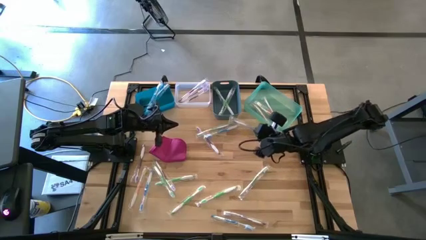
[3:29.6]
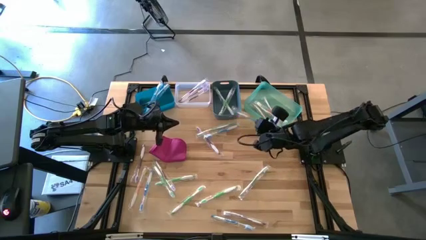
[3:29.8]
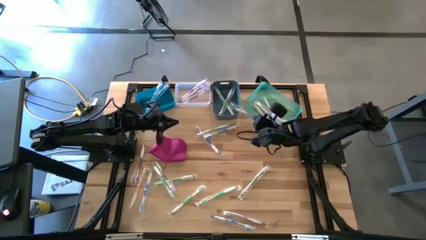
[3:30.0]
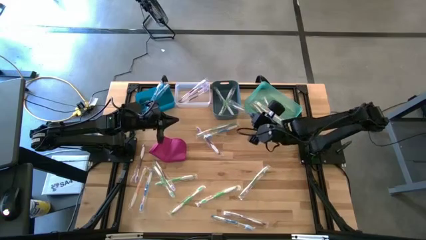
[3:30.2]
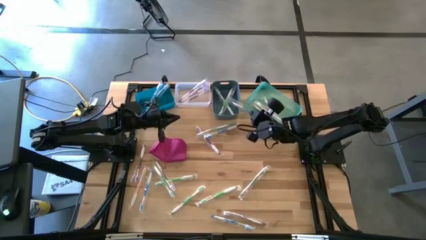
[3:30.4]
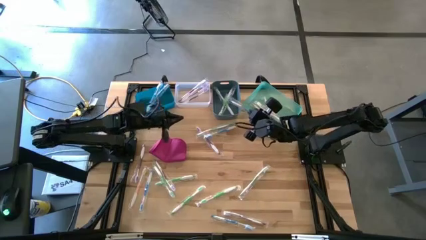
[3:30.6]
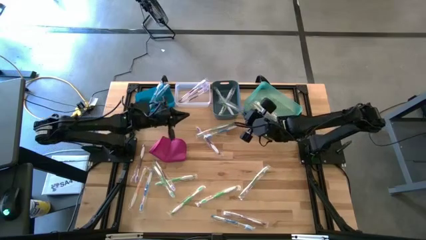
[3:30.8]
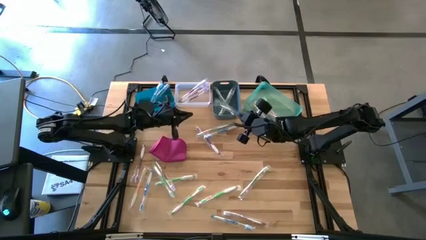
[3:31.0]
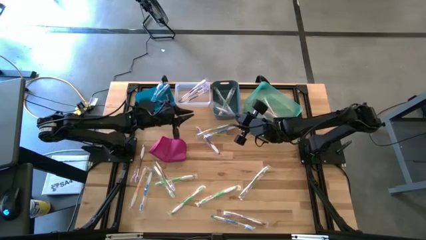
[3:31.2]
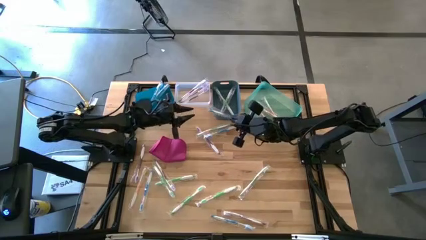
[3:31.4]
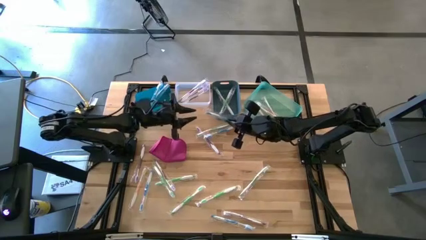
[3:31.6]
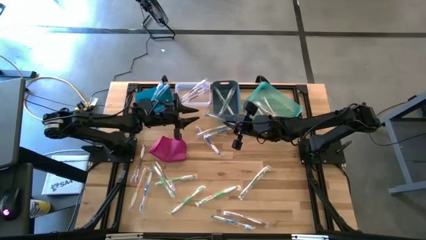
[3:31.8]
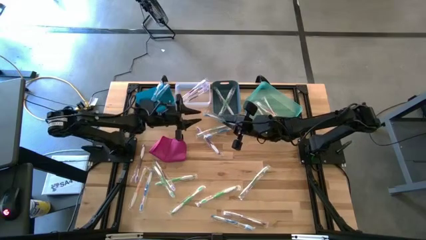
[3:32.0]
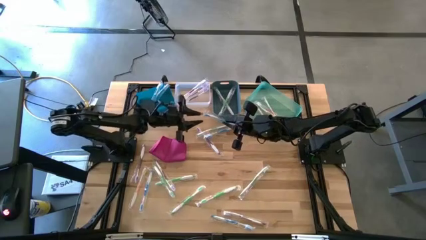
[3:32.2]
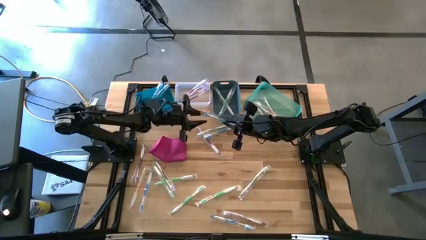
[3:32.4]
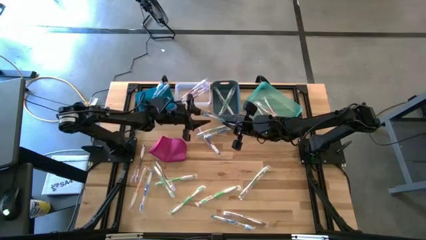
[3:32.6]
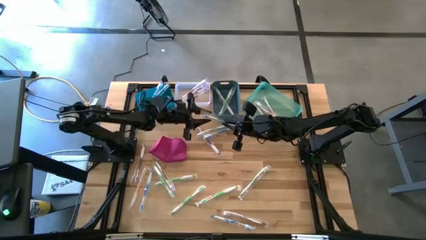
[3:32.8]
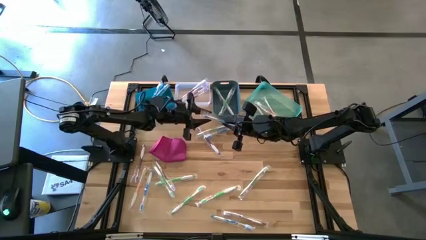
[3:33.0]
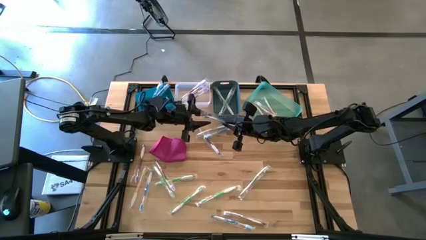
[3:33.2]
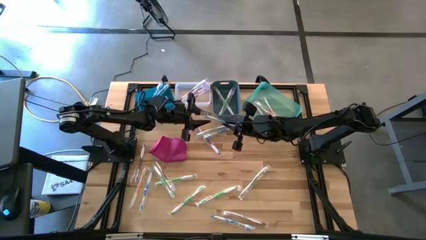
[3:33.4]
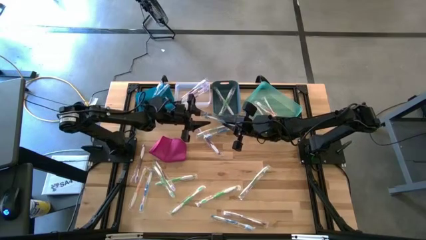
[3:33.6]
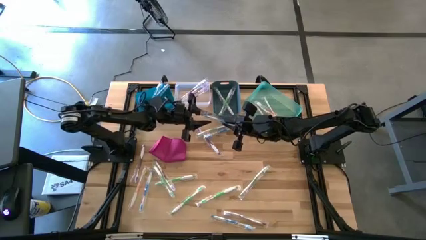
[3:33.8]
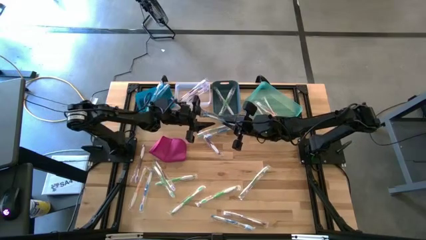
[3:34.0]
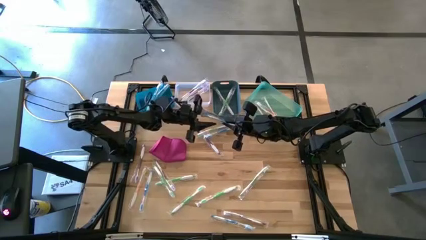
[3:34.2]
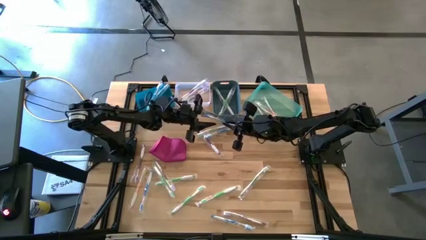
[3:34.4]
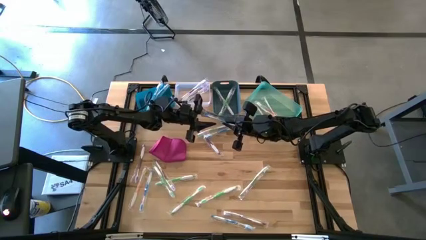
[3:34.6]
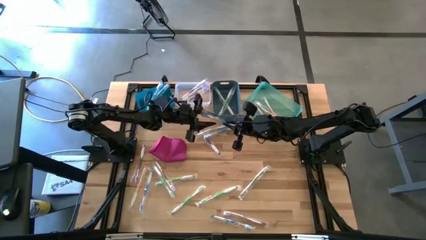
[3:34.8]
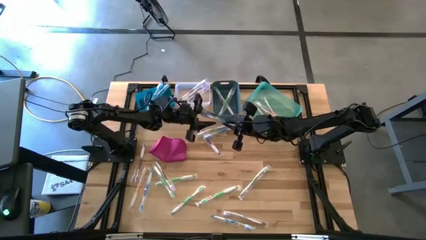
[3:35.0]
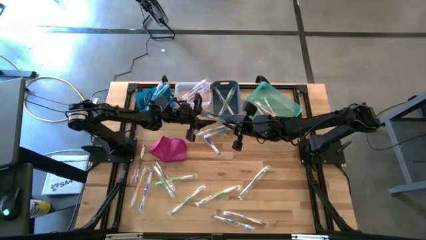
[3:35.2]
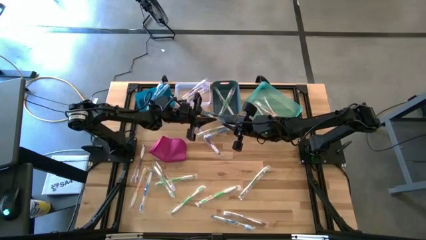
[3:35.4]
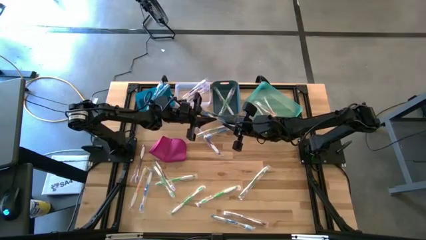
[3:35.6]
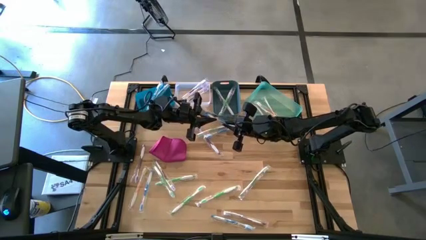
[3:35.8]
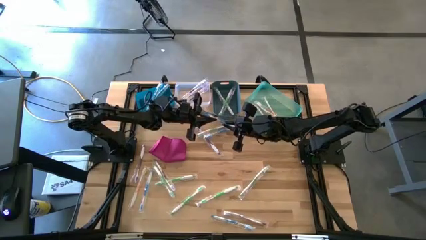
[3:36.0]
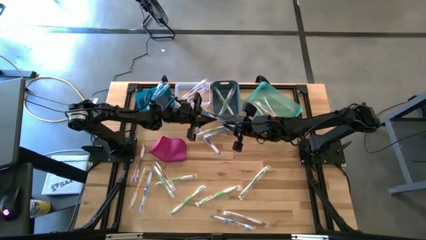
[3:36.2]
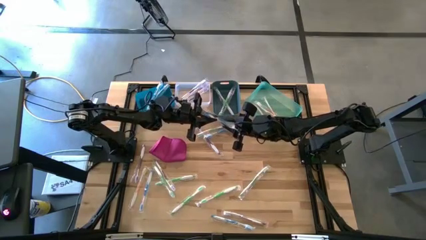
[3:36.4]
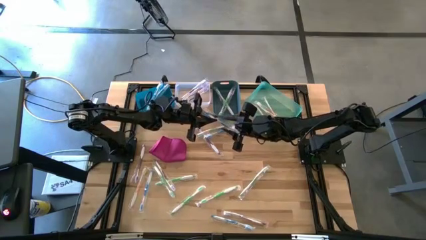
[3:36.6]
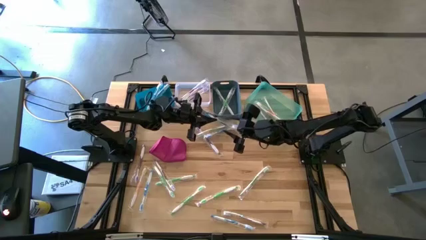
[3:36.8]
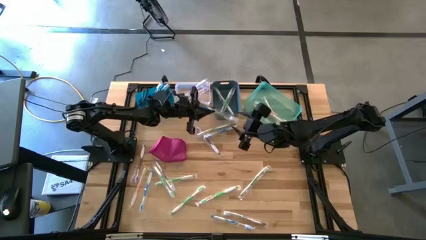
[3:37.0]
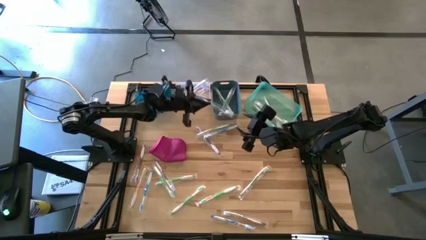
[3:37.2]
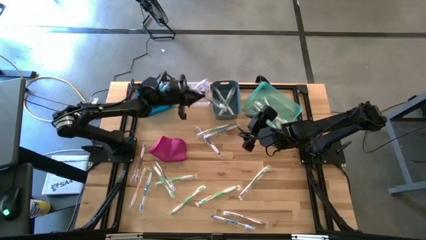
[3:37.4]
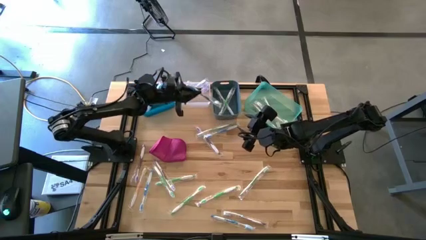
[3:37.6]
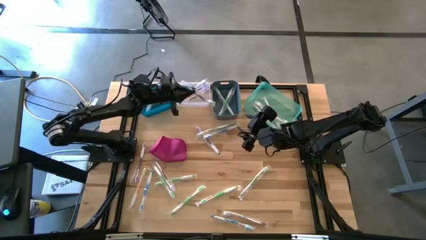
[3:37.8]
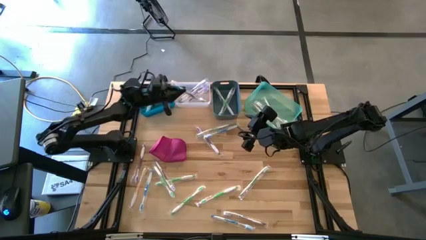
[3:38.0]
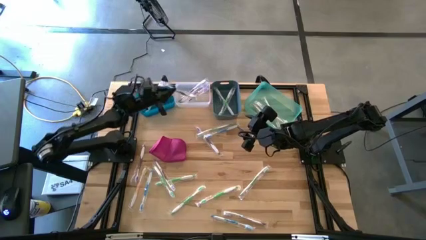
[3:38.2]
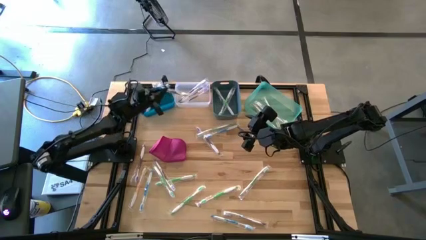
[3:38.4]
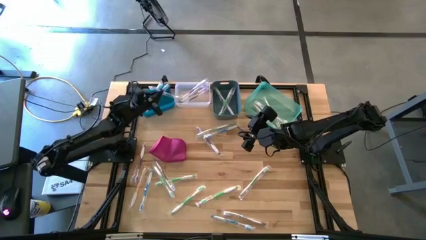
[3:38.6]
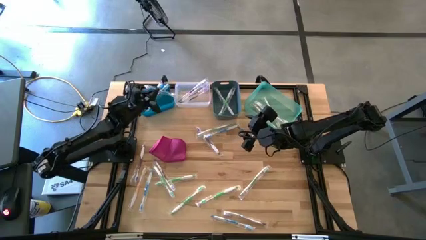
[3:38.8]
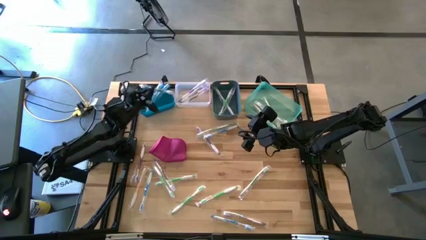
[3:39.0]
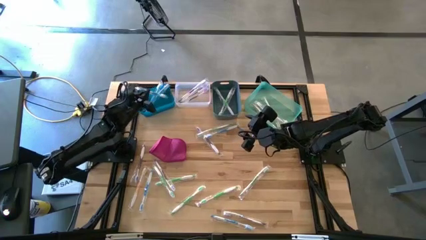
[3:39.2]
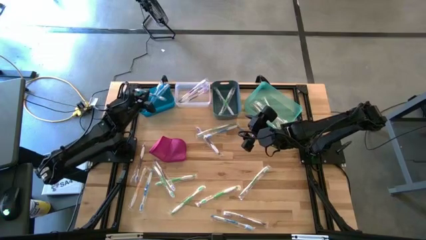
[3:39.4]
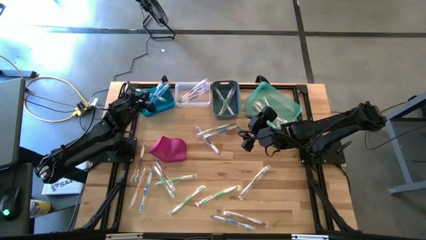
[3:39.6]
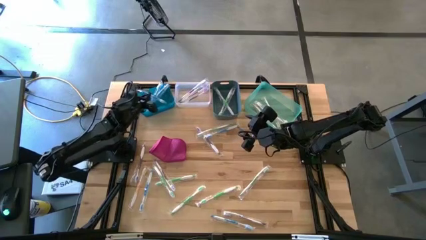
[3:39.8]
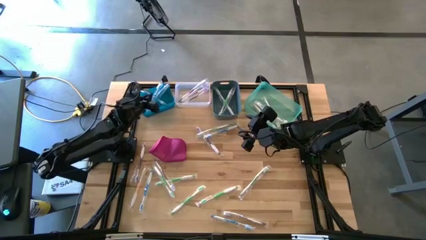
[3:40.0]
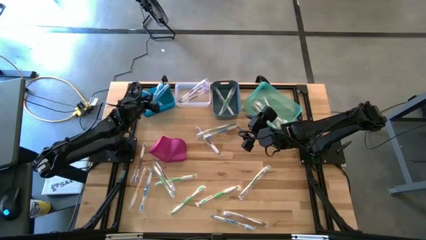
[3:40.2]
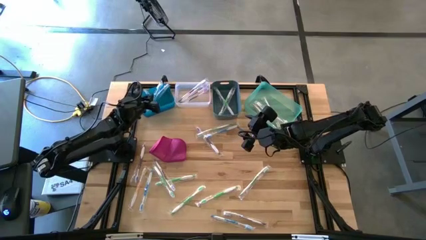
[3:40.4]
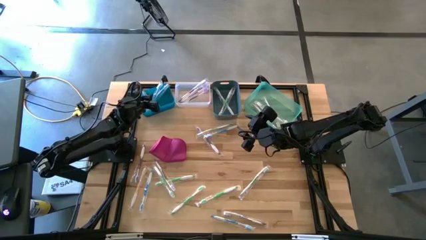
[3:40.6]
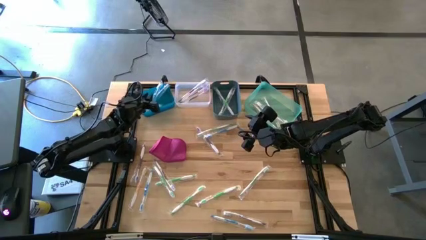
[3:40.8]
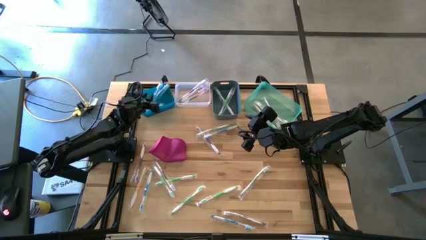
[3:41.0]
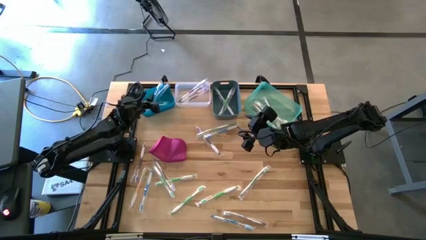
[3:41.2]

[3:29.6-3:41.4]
Task: Pick & Place Toothbrushes
Put the blue toothbrush into the blue bin

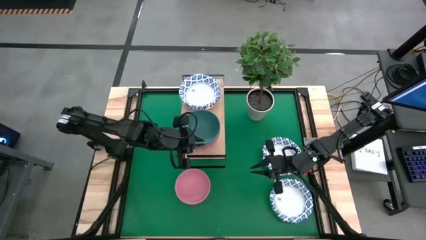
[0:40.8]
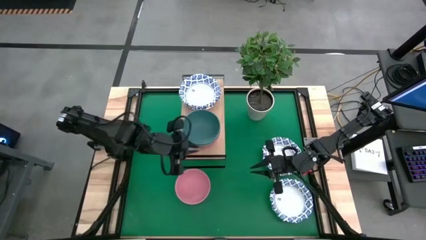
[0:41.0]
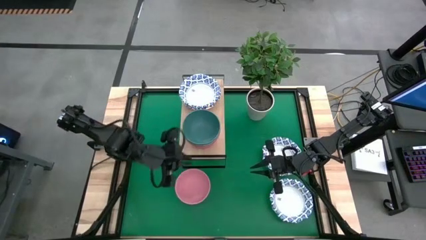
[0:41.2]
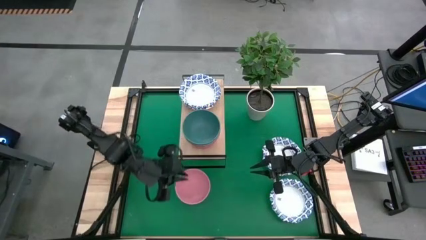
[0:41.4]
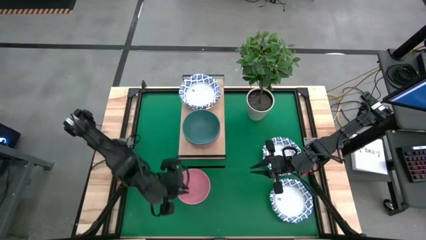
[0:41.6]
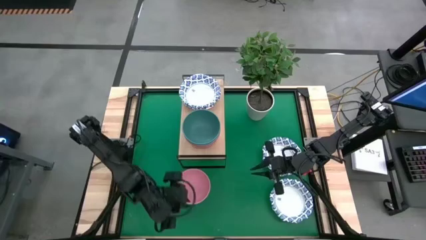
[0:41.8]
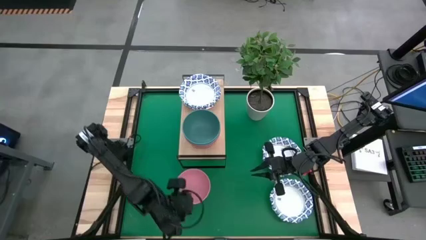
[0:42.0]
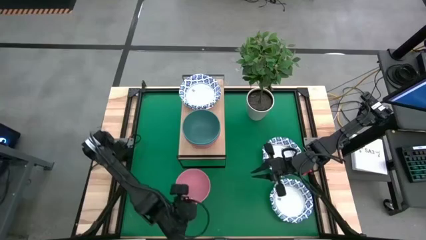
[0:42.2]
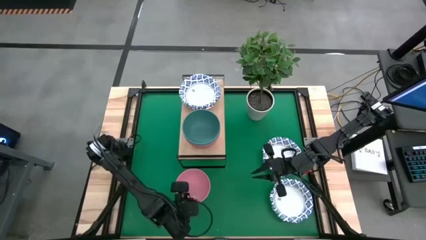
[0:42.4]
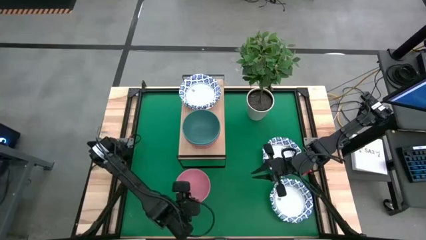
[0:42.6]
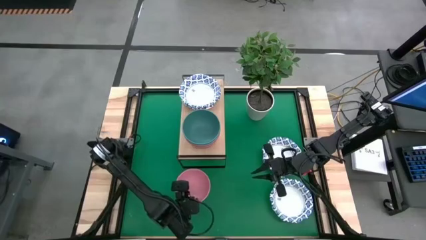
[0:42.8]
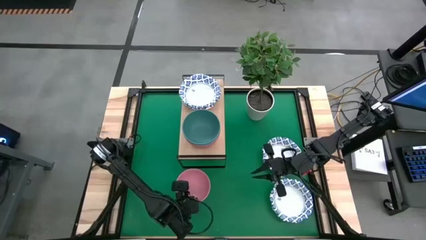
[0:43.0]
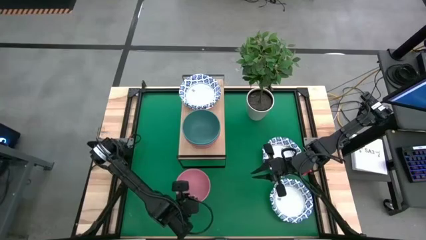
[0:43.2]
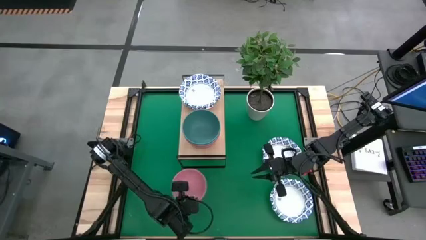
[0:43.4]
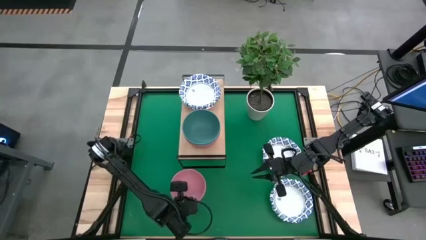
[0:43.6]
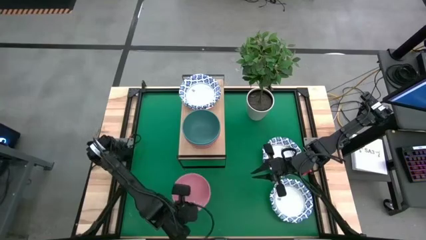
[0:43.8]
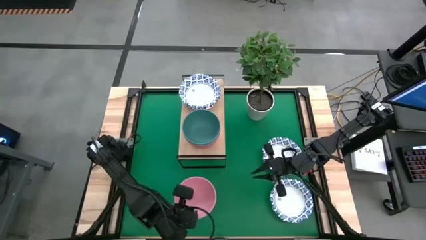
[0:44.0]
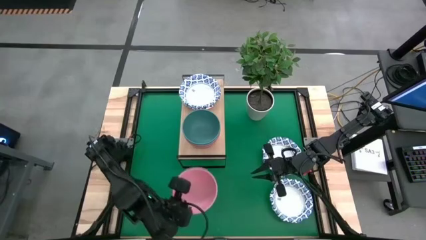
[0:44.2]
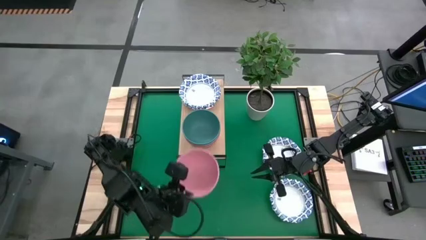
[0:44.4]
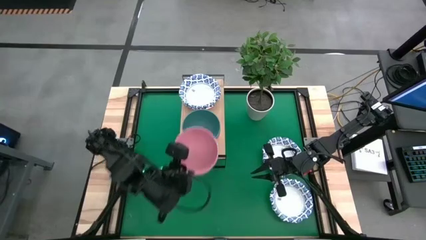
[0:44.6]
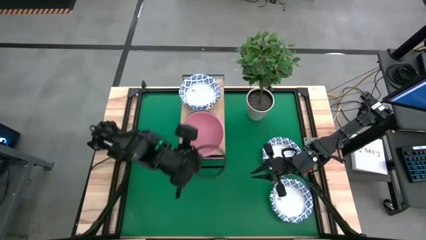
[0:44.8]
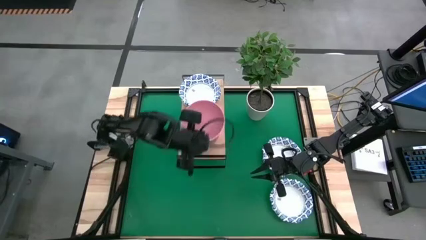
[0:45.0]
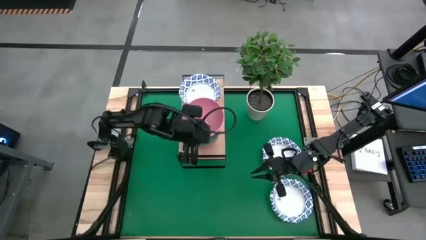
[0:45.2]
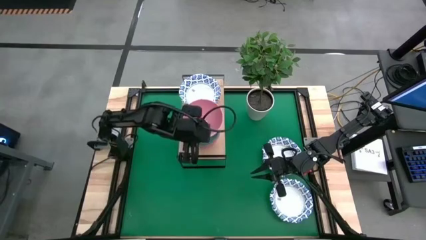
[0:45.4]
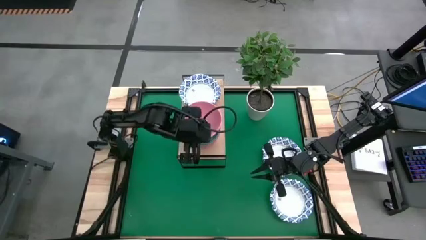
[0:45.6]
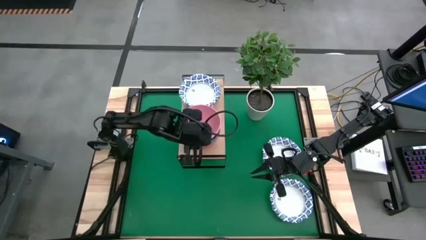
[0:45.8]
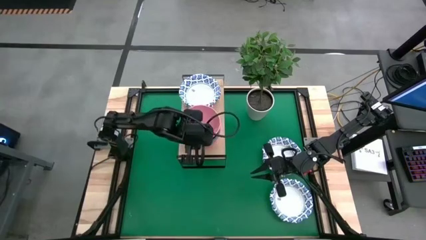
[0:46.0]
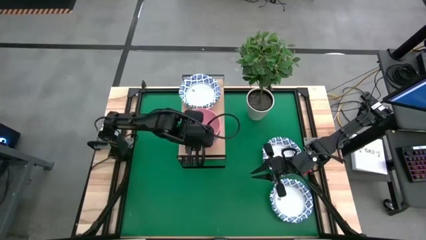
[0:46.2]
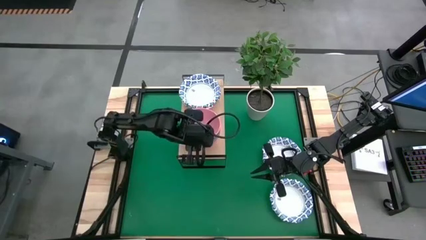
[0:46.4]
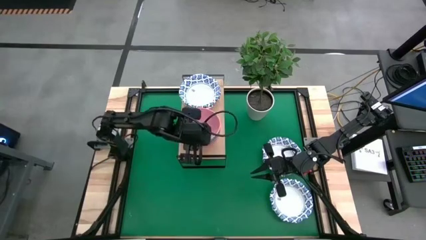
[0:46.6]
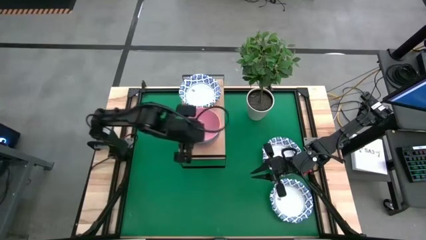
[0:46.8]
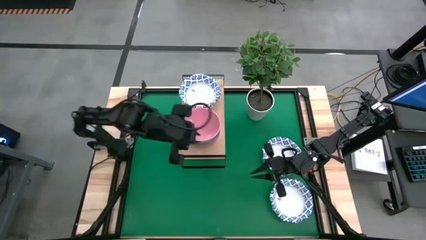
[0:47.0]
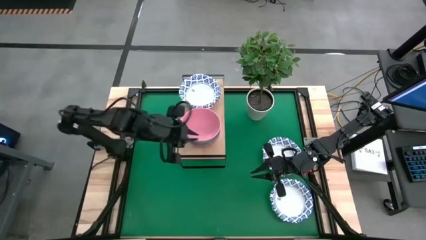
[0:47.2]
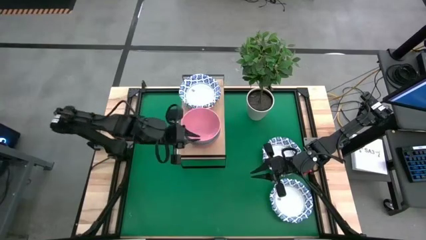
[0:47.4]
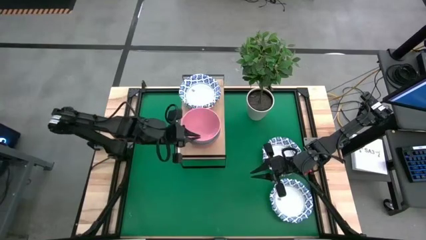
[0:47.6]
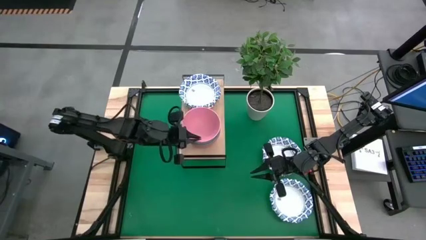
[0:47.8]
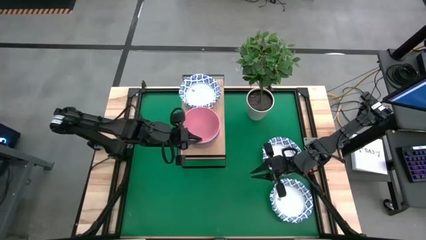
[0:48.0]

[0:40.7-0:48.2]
Task: Place and stack bowls onto a shelf
Stack the pink bowl on top of the green bowl on the shelf
